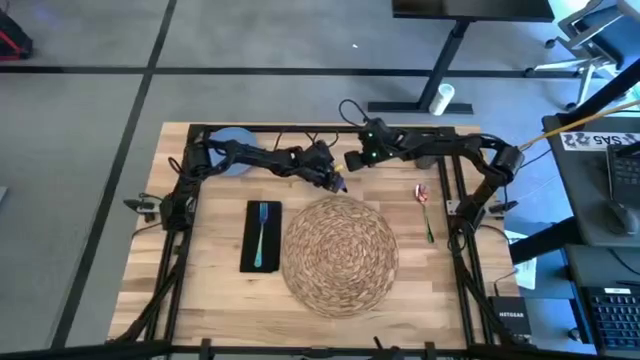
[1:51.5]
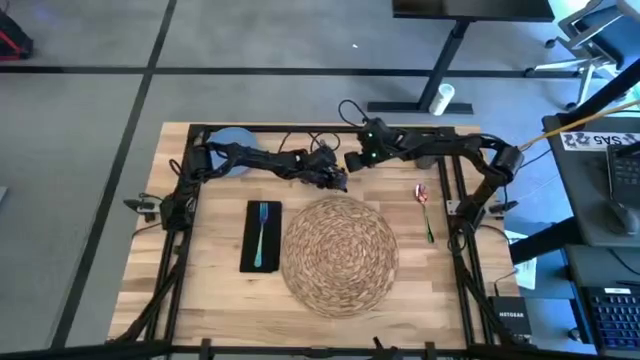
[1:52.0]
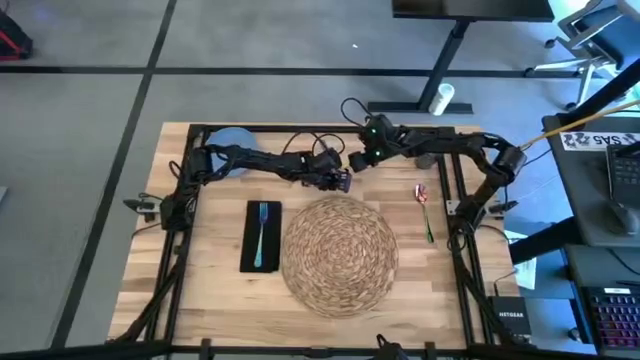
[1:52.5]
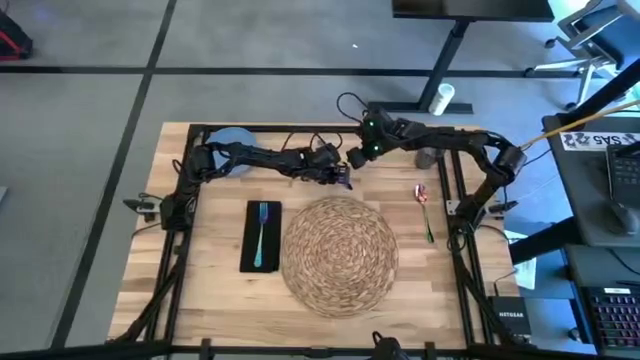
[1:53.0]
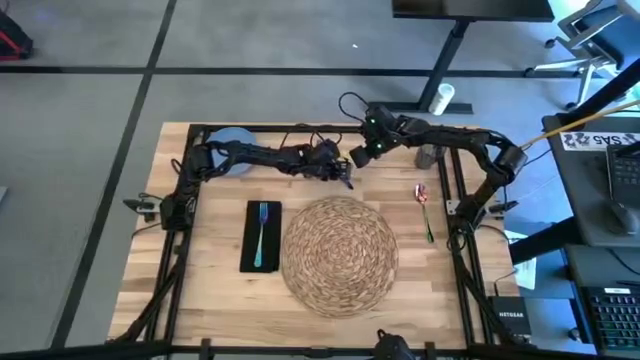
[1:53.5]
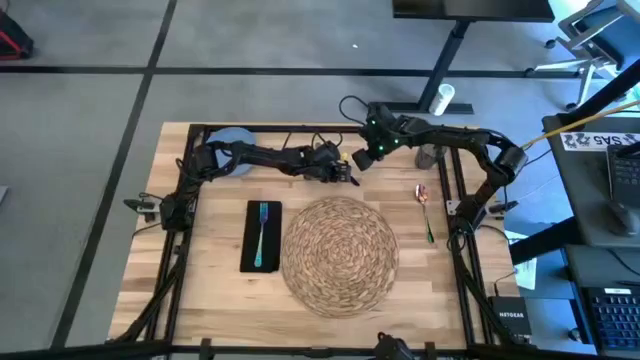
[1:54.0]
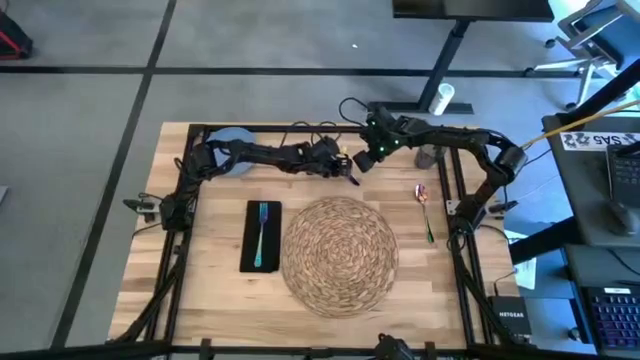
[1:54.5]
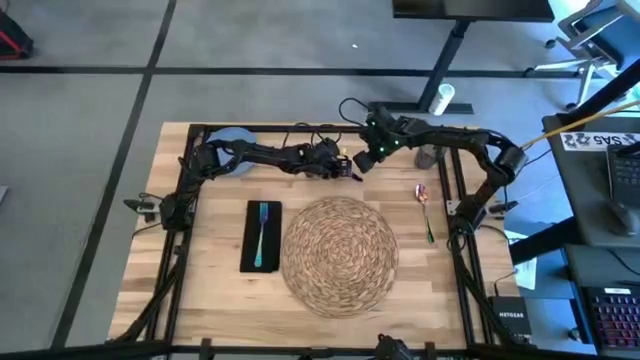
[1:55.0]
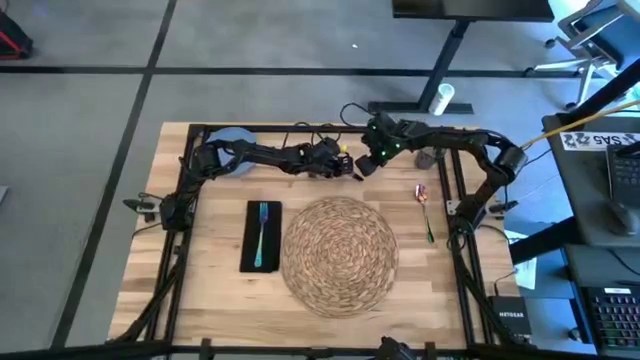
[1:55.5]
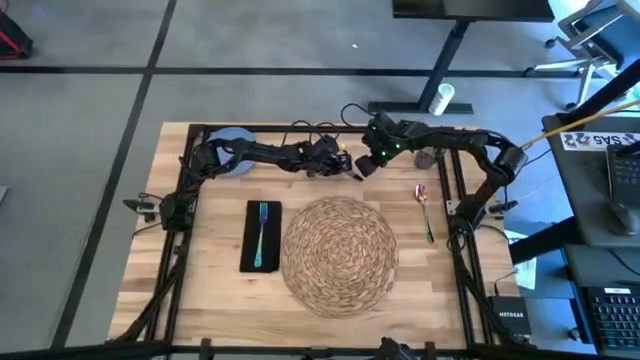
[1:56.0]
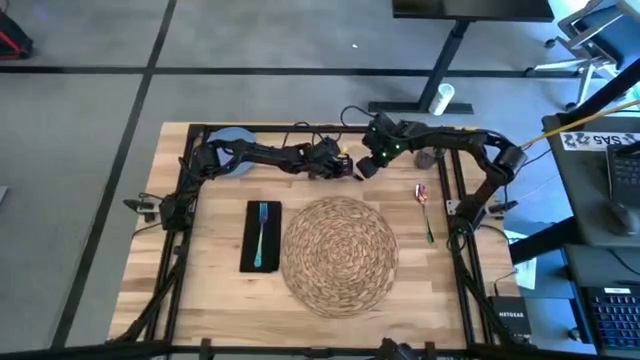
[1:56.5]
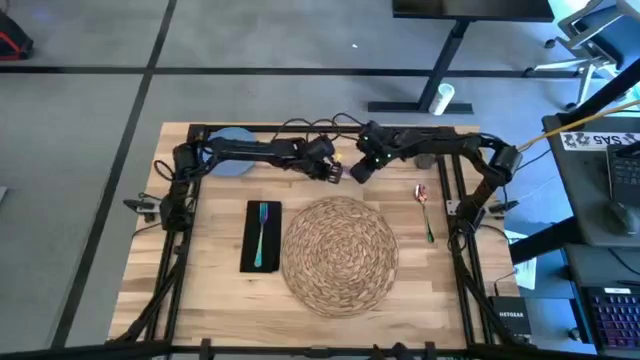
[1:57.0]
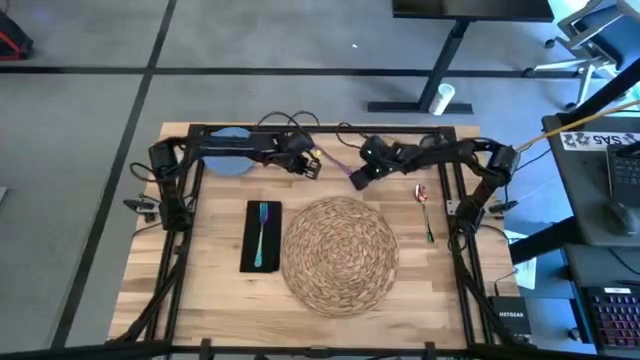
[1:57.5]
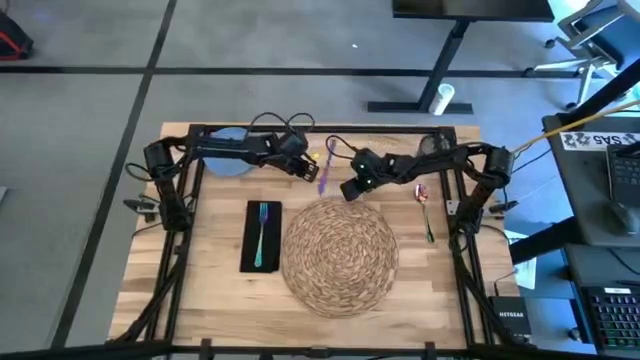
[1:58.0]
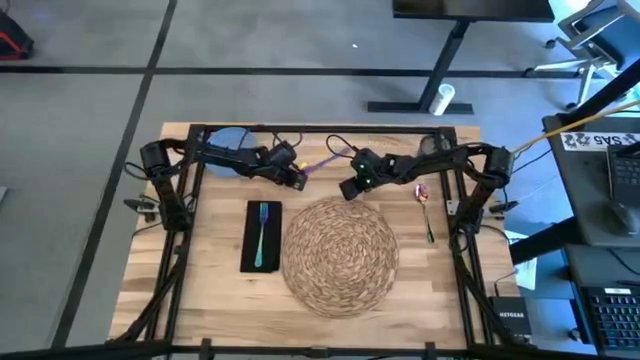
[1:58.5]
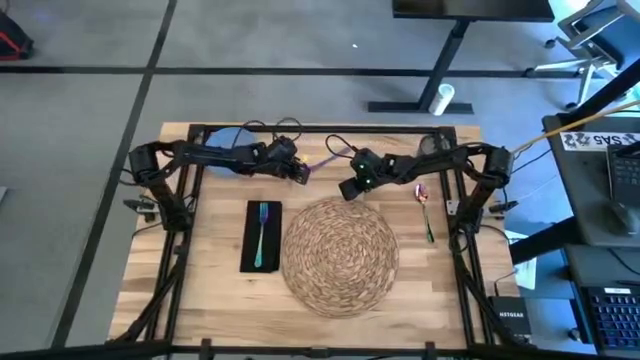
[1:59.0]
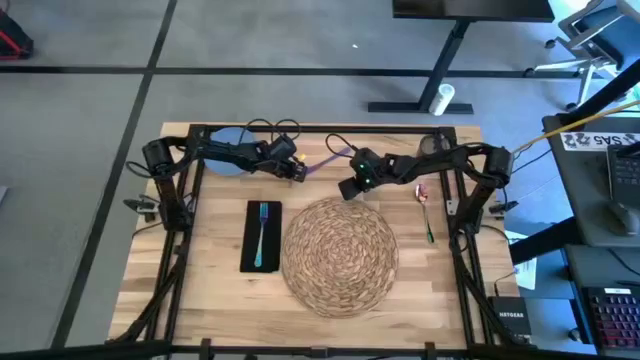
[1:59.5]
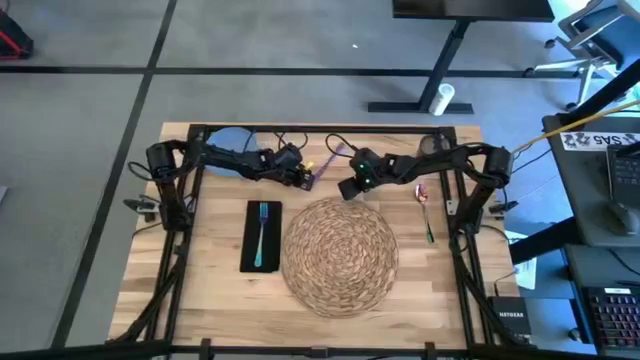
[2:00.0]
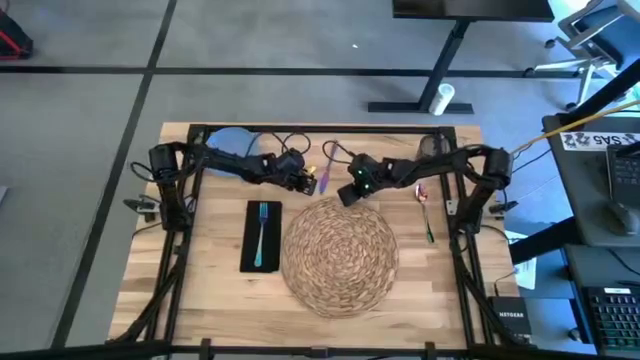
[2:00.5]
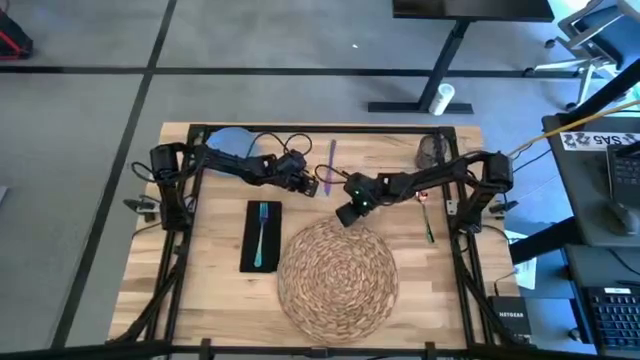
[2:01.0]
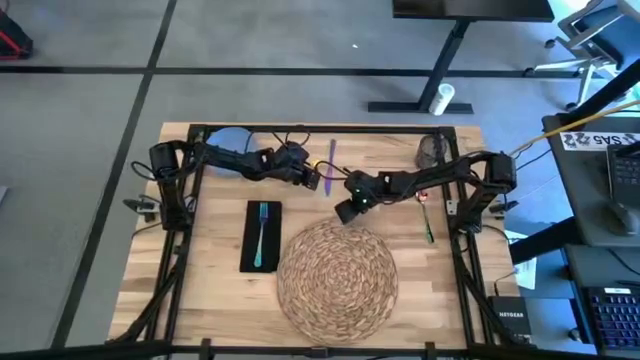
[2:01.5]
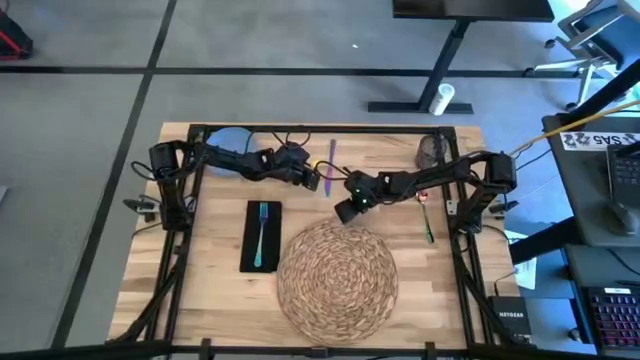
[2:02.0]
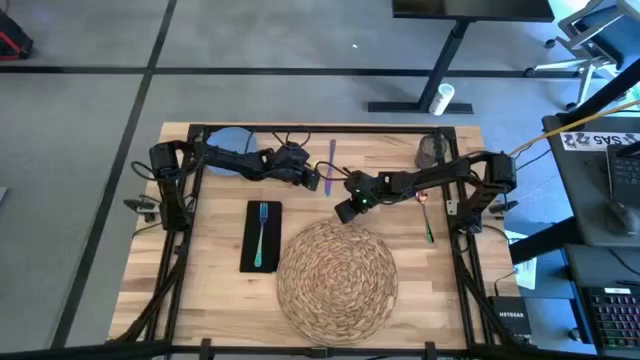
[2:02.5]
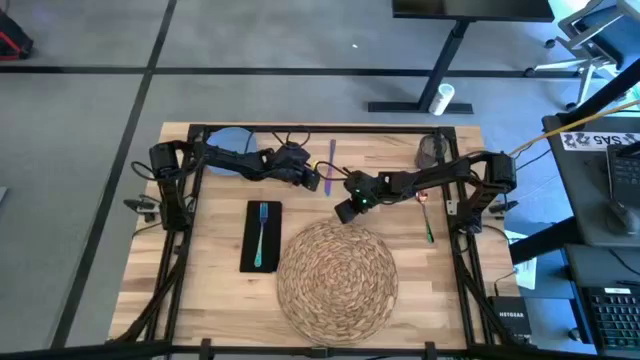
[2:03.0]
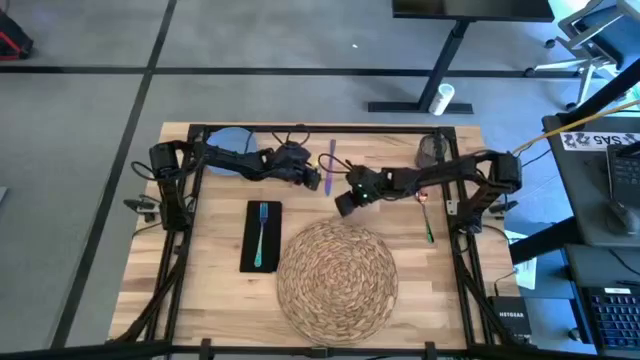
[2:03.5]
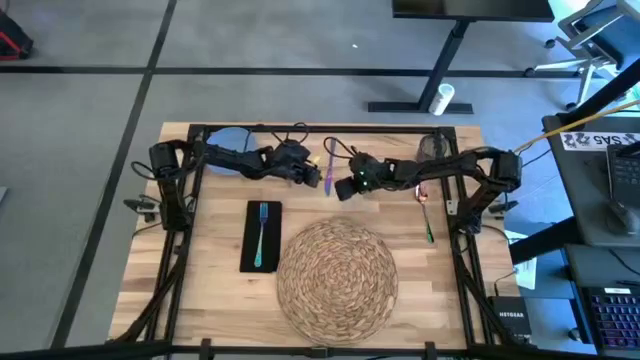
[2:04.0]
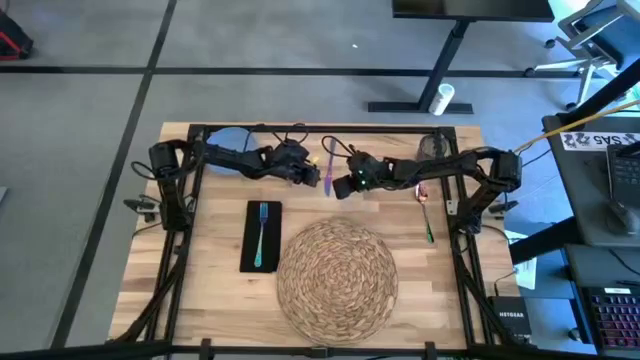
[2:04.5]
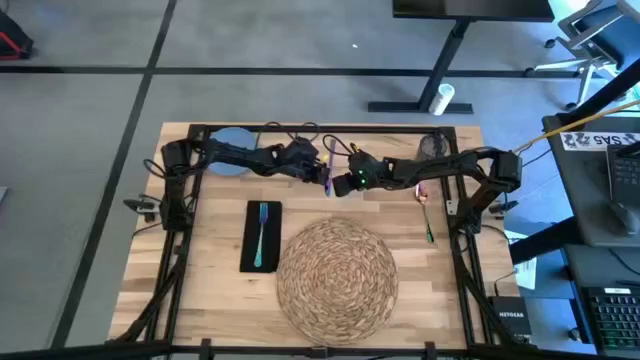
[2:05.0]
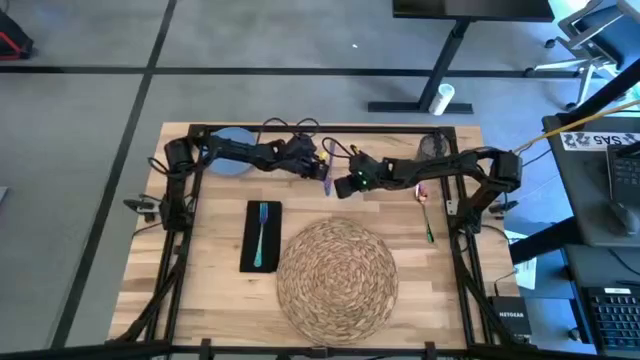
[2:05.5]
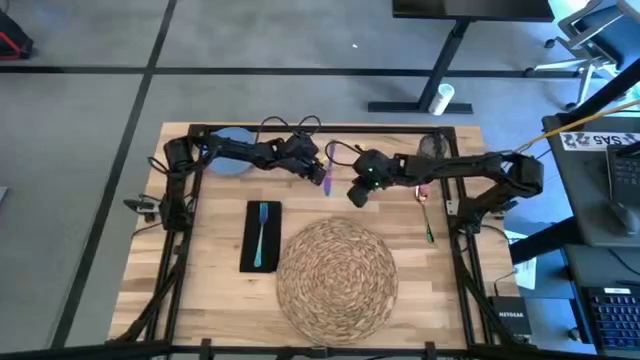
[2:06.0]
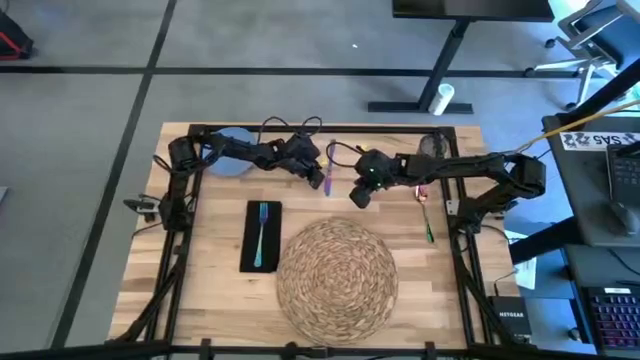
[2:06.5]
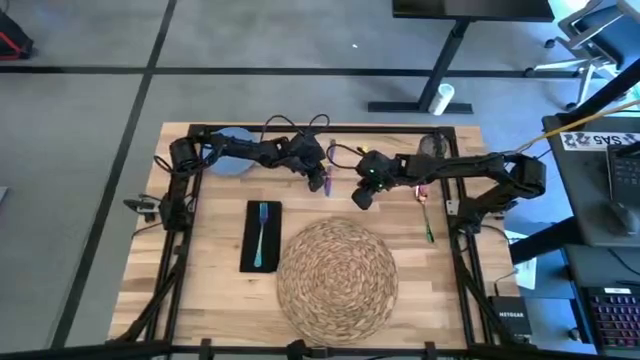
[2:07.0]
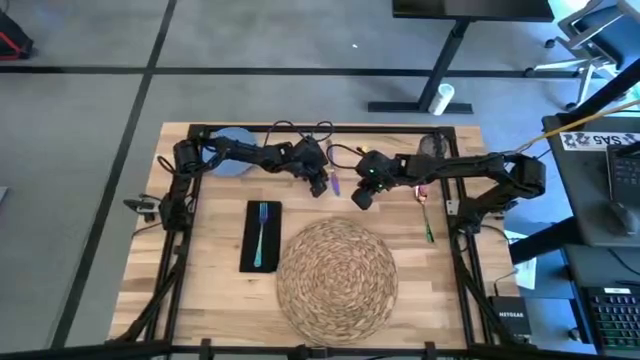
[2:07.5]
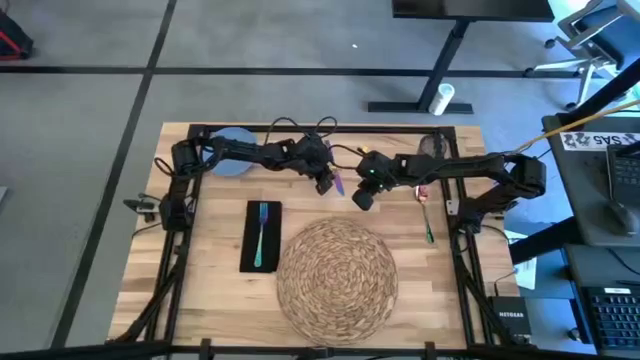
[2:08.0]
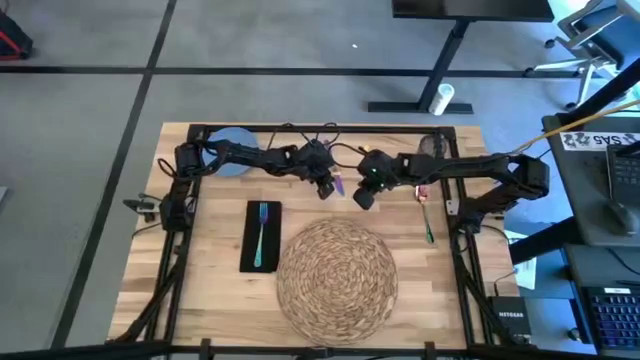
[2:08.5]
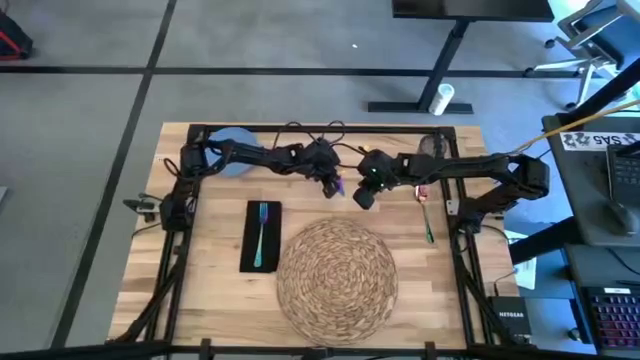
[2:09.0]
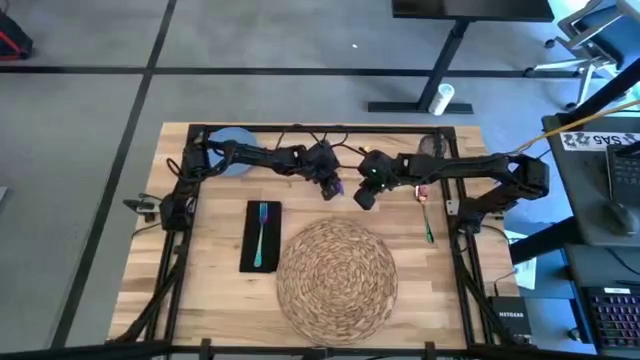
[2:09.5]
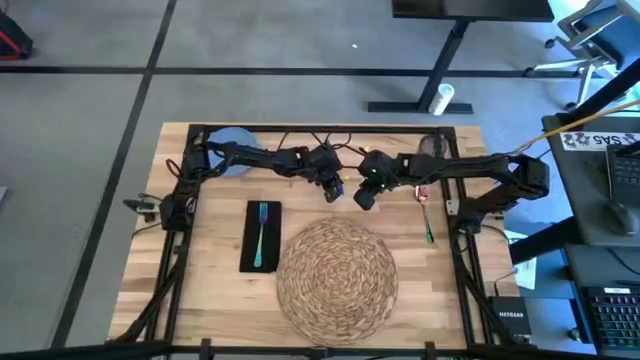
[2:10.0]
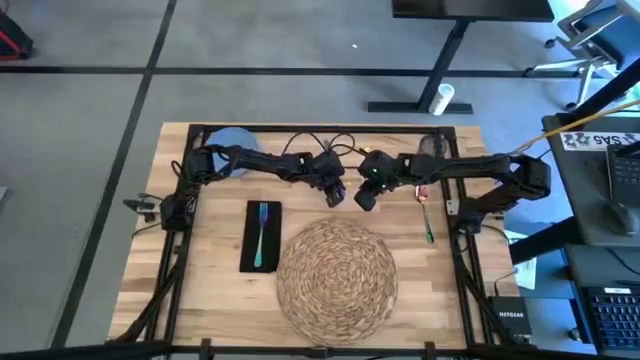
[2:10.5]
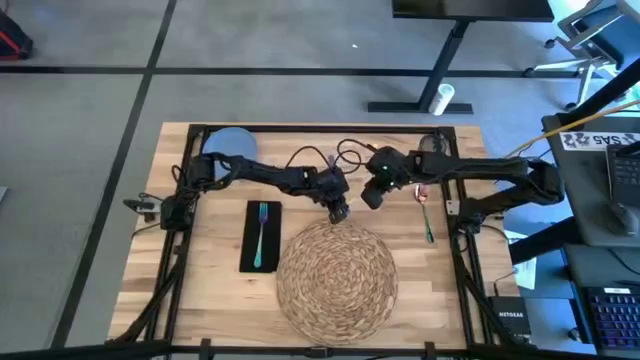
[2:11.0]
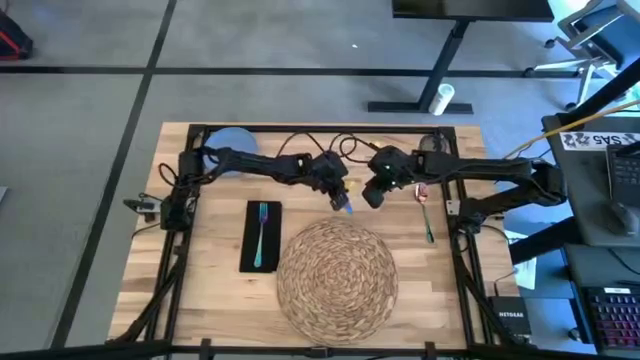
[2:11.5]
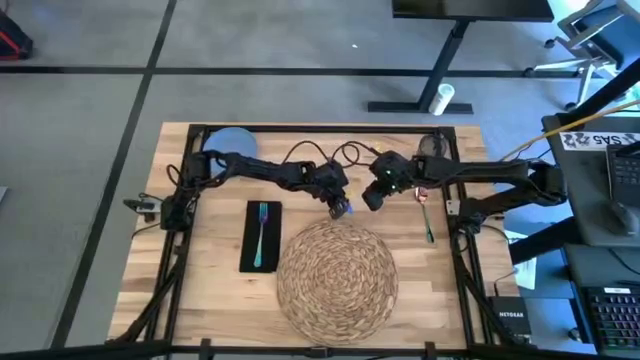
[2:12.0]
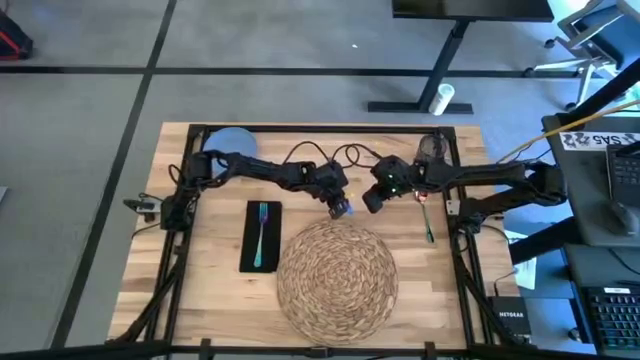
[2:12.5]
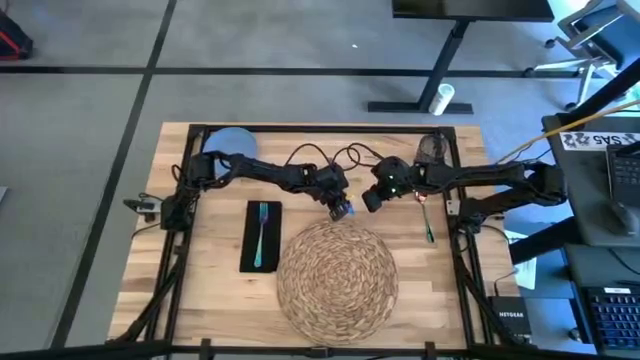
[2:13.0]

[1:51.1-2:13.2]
Task: Set table place
Put the blue table knife on top of the brown placemat
